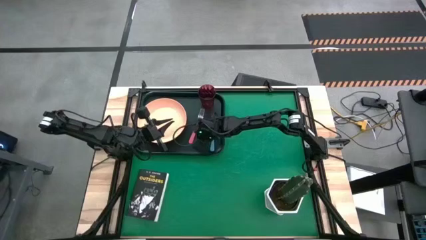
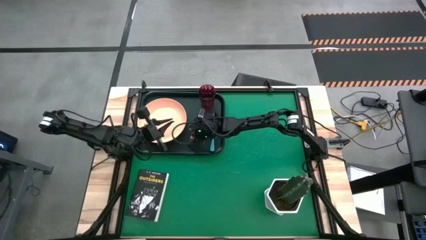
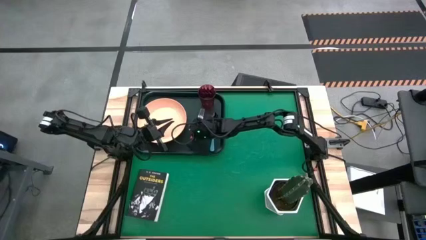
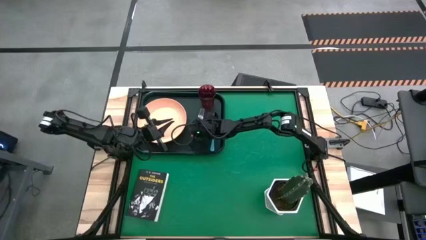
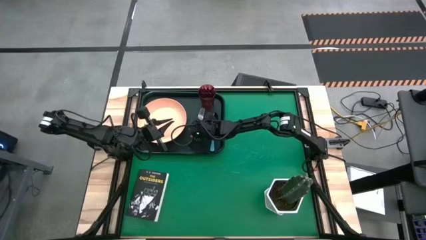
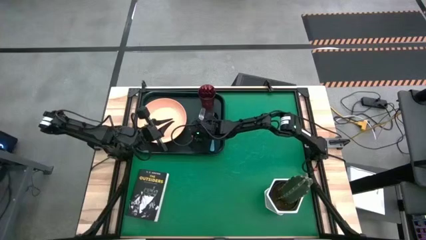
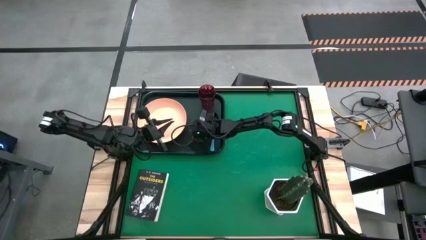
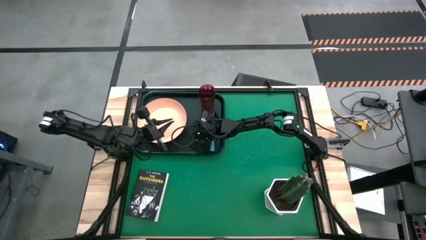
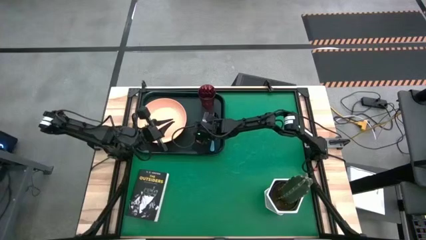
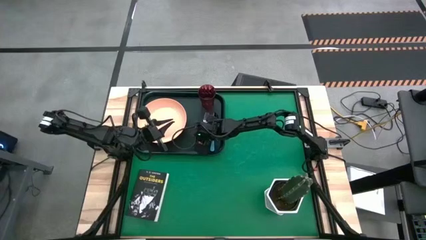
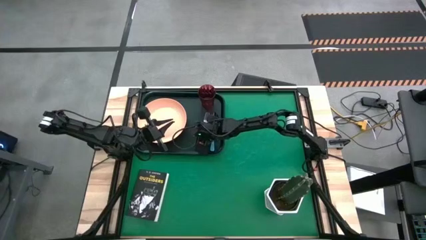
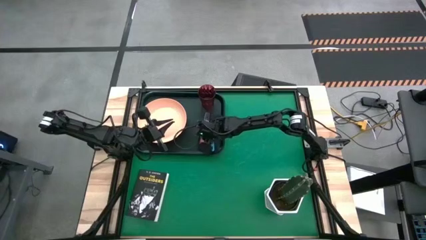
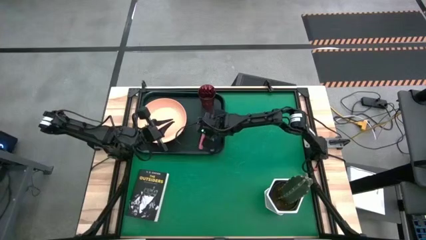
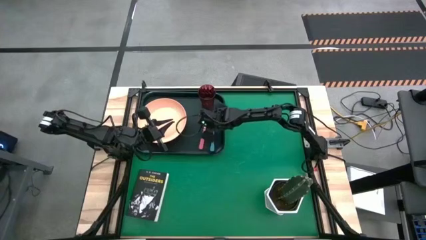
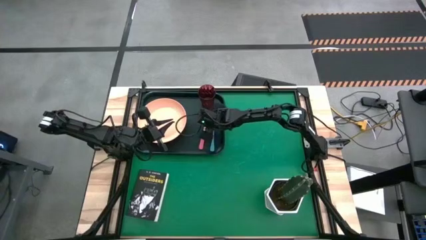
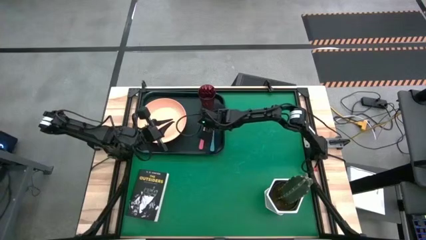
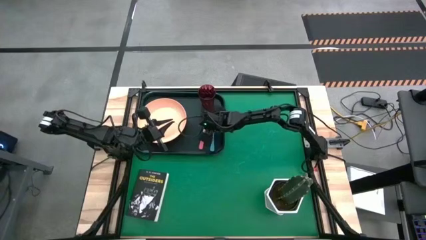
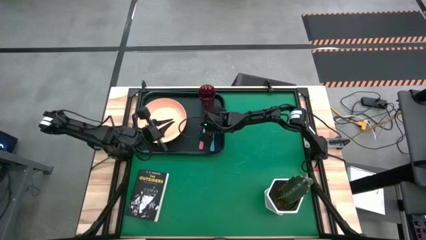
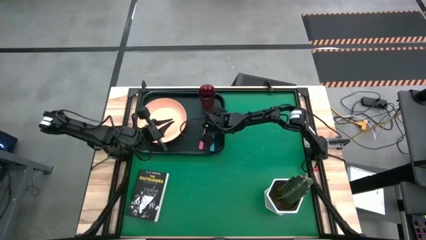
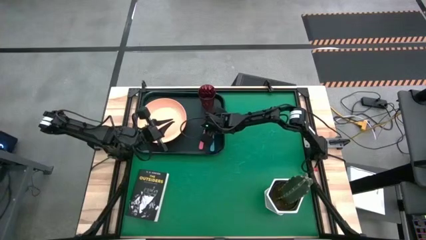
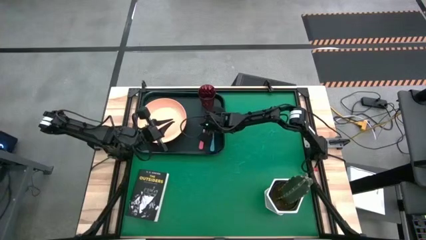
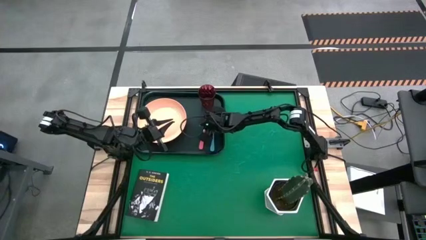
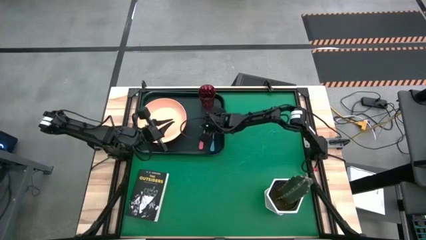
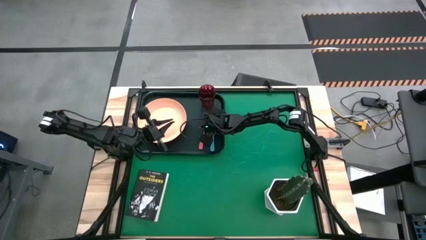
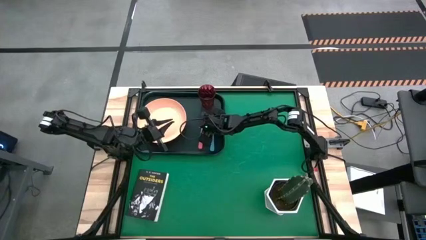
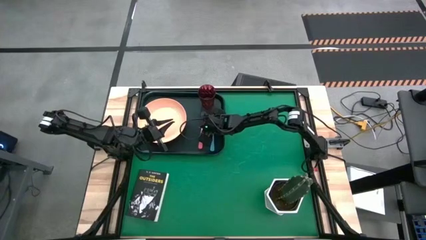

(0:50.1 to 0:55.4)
Task: Pick and place plate/cup/fork/spoon on tray
Adjust the pink fork

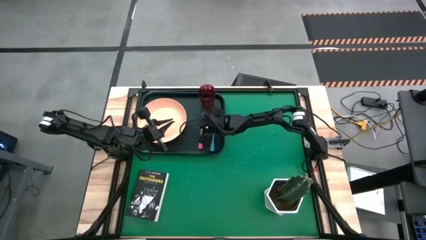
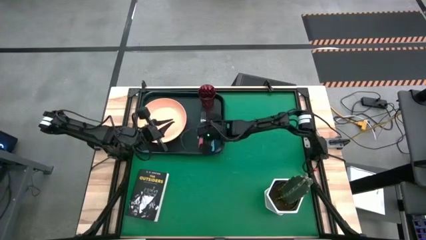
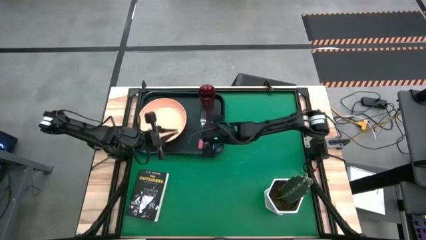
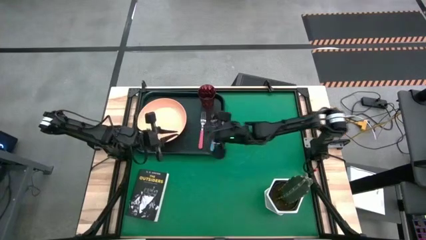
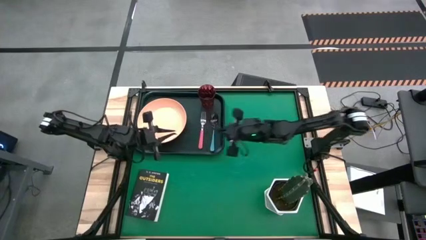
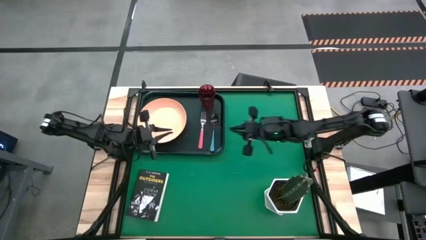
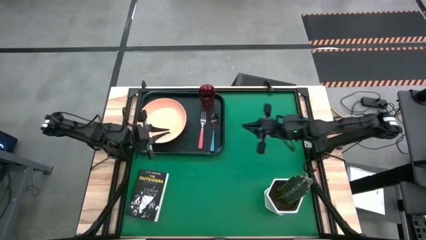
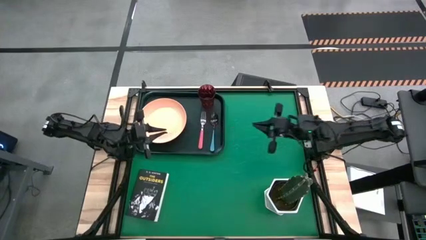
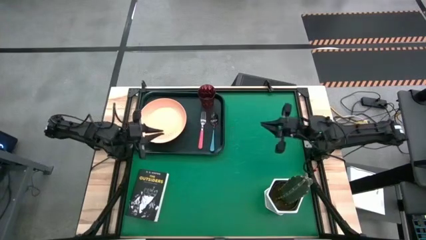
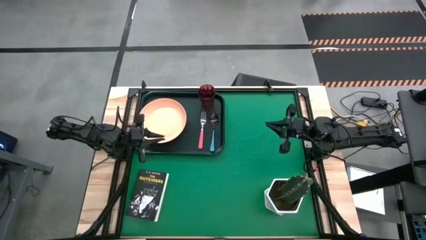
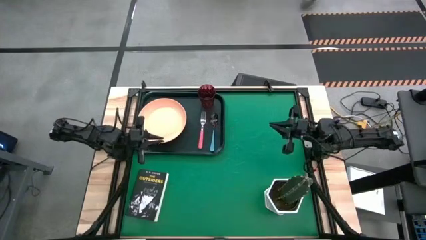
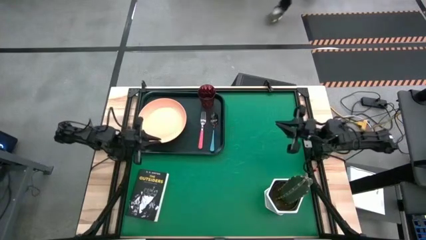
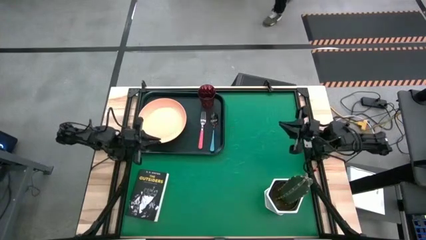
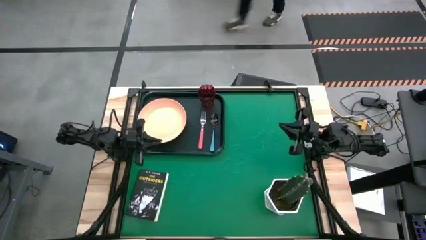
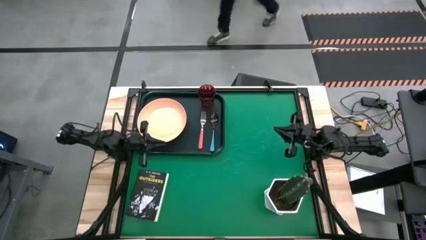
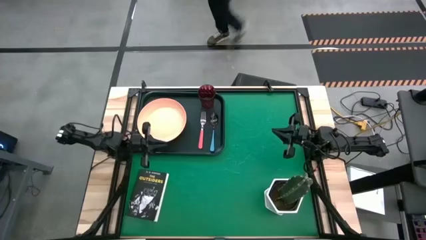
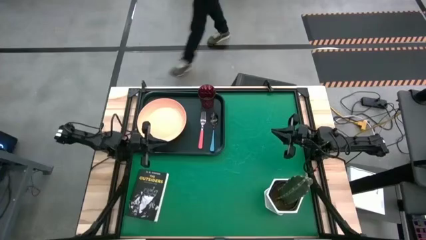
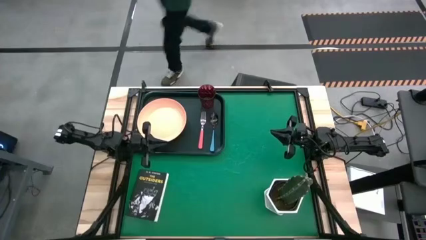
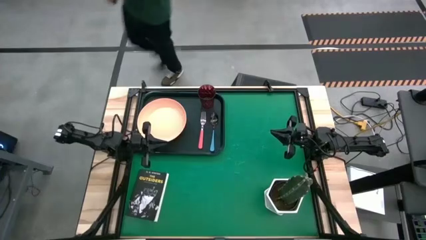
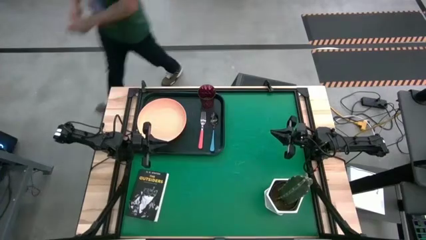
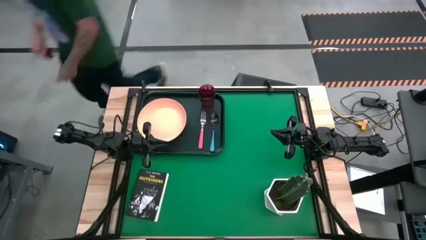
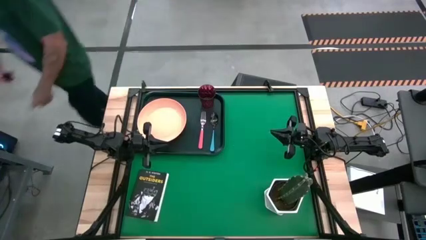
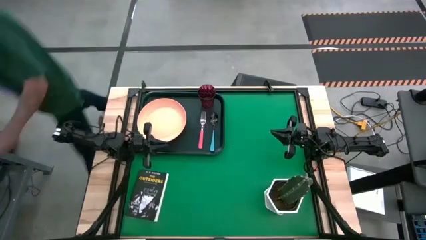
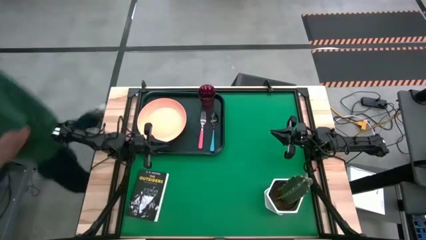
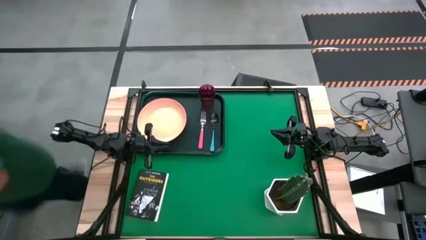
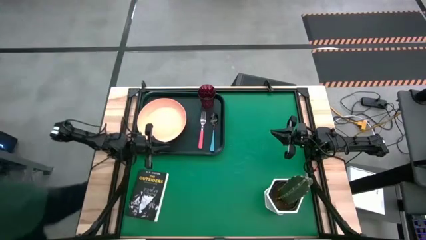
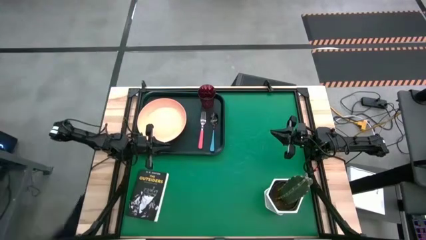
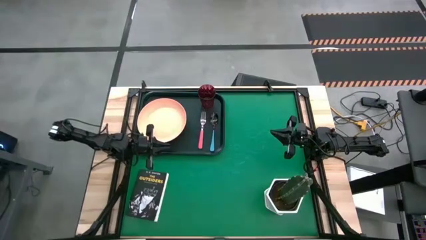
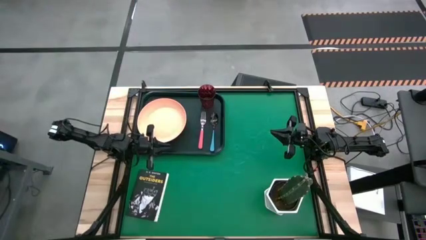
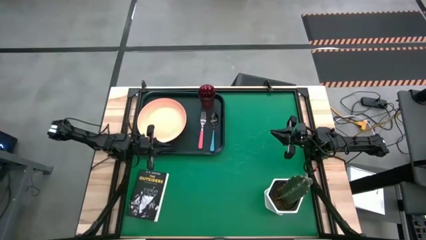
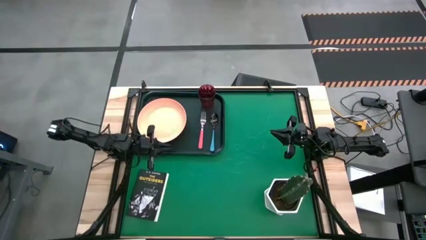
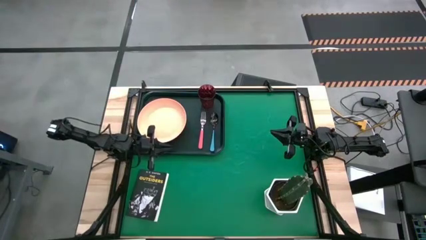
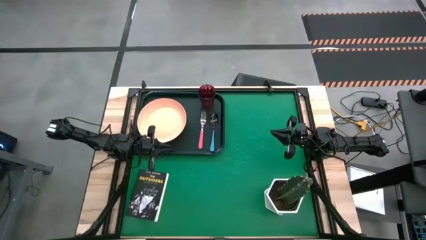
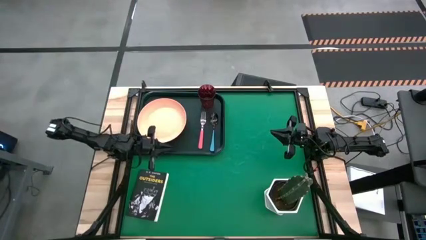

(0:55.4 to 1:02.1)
Return to Home Position
